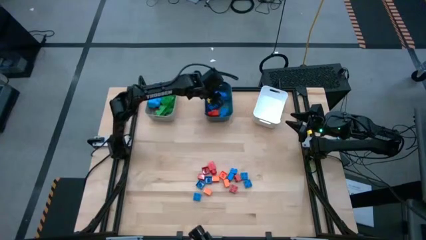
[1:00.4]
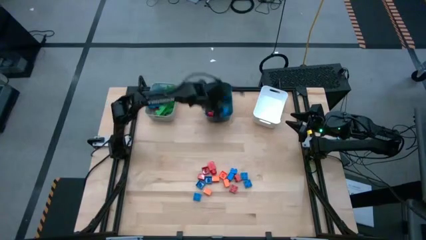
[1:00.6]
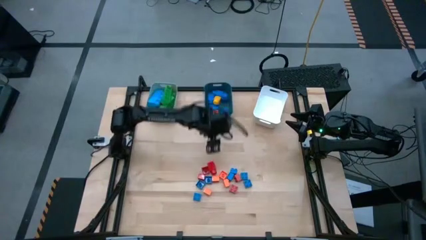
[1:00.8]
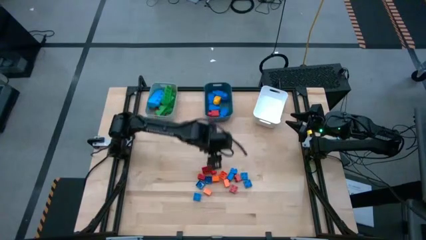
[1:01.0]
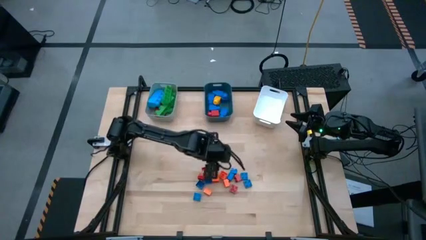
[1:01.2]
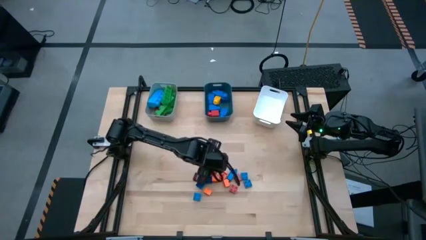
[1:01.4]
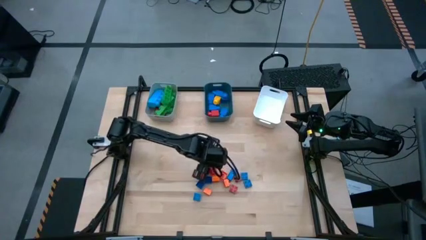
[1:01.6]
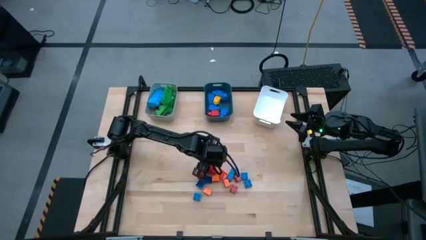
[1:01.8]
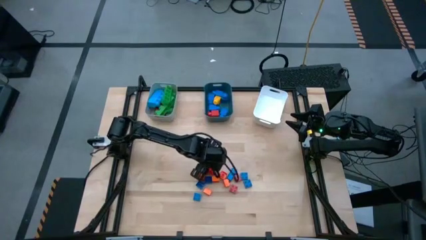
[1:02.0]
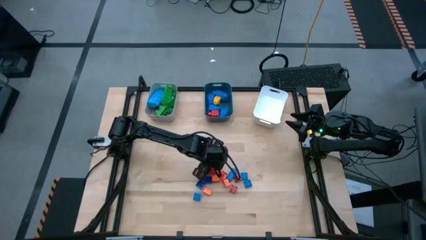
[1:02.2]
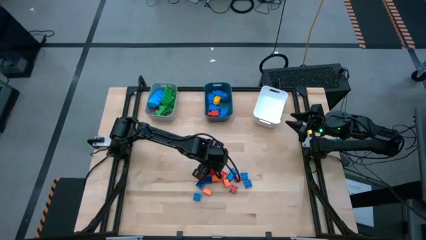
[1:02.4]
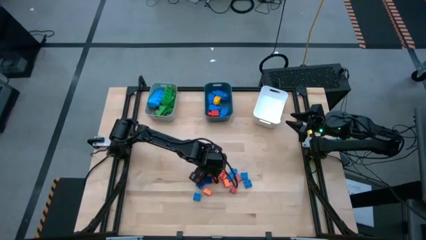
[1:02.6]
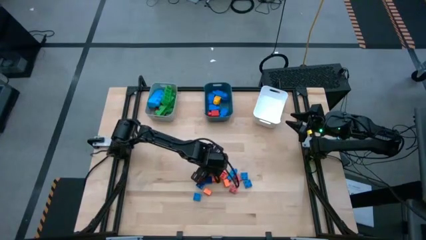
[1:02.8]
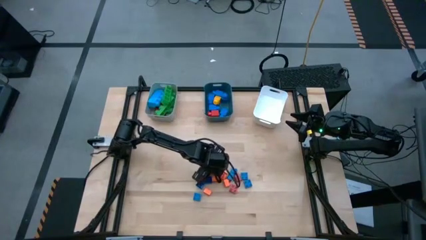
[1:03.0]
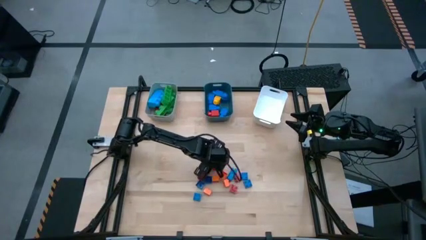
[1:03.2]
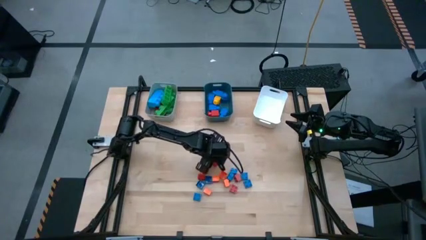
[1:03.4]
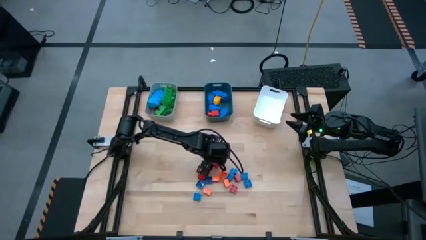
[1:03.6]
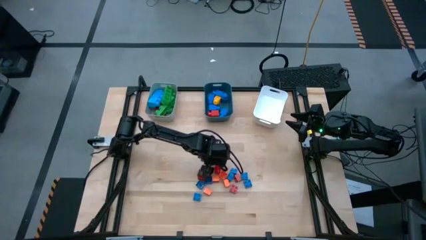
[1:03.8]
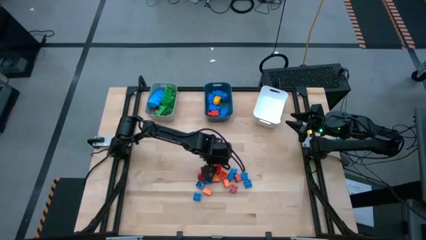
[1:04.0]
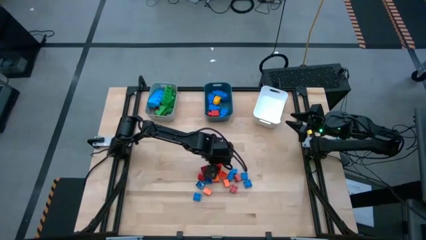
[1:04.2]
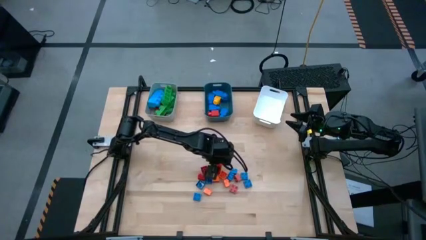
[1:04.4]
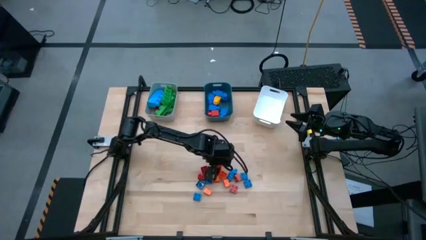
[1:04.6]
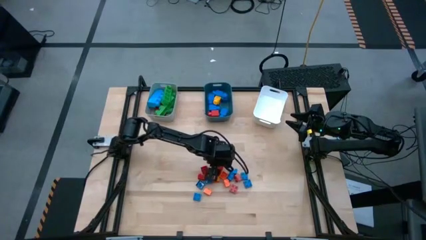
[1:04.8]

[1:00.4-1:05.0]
Task: Sort blocks by size
Put the red 1 stud game piece into the blue bin

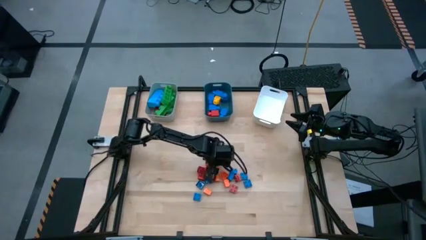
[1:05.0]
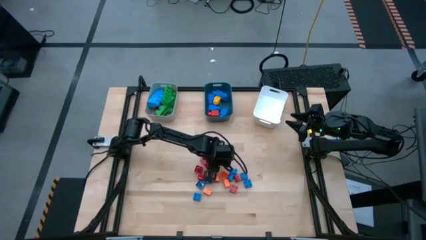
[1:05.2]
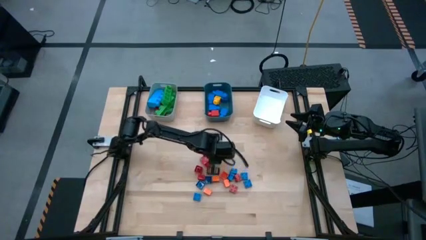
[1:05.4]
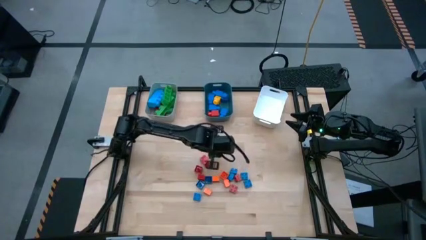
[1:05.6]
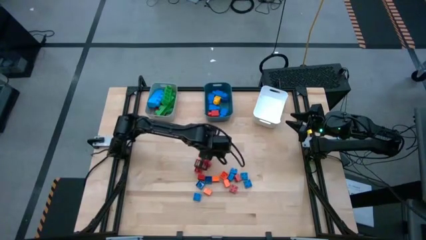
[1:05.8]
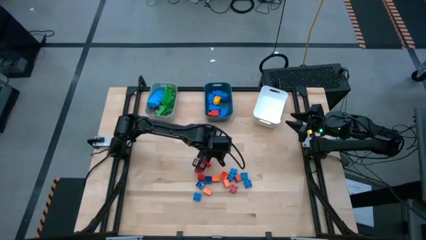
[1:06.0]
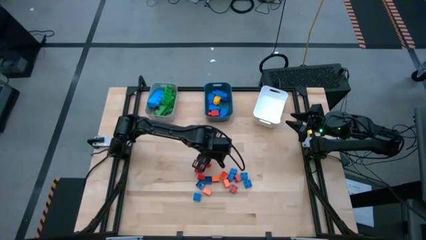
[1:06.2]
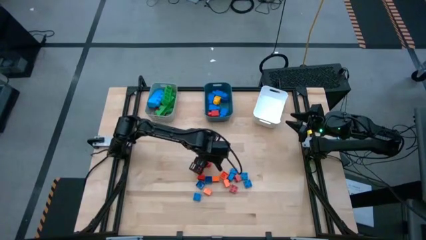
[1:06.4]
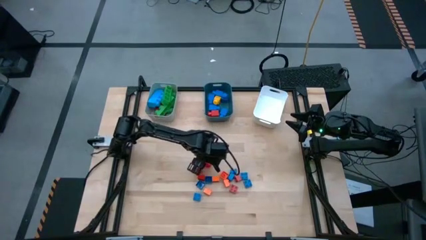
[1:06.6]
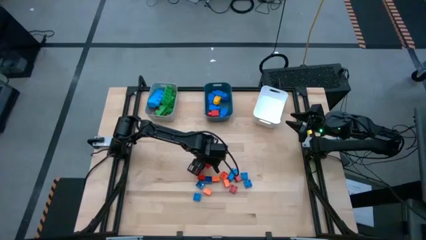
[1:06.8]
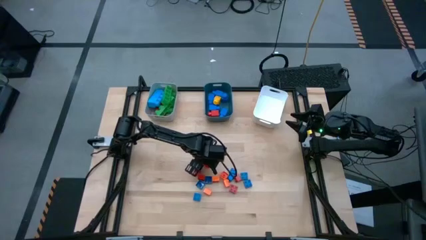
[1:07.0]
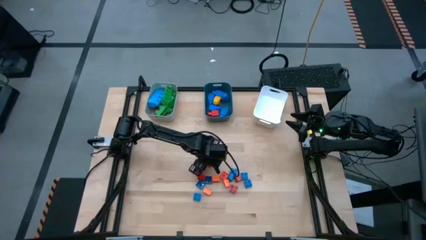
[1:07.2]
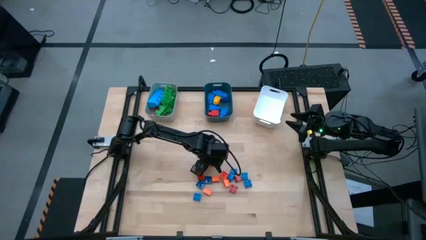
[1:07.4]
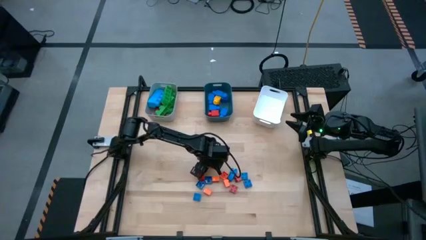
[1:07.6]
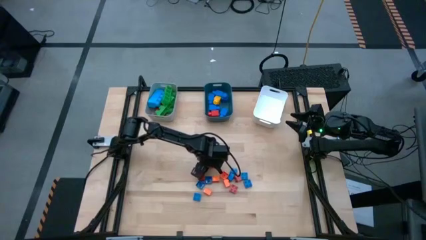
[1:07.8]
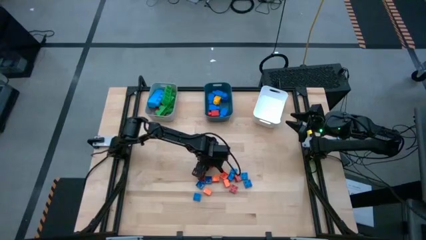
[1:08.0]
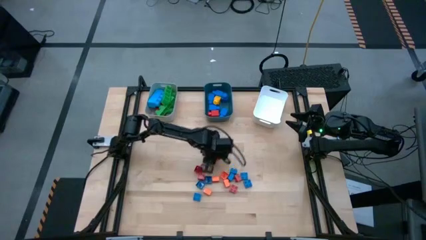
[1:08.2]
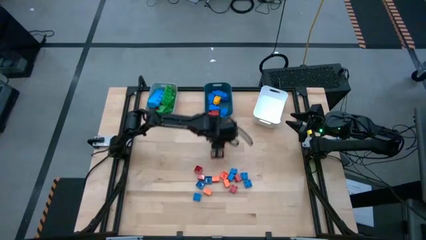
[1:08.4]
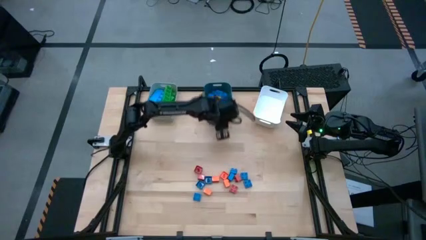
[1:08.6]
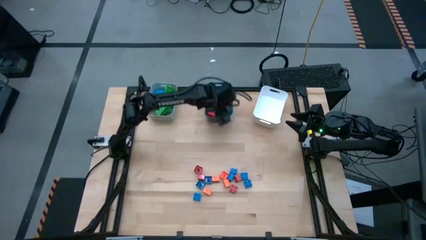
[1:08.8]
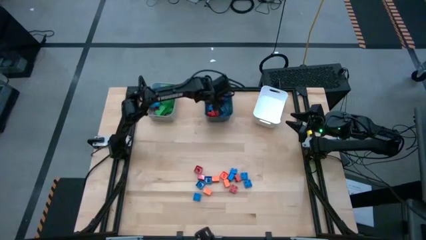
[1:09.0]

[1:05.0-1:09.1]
Put the red 1 stud game piece into the blue bin

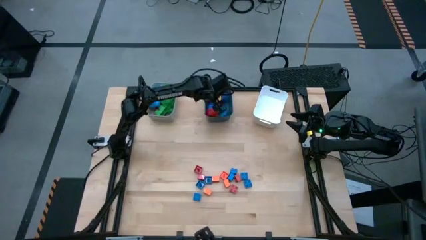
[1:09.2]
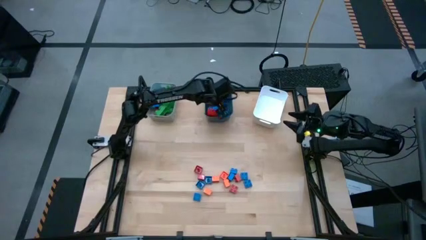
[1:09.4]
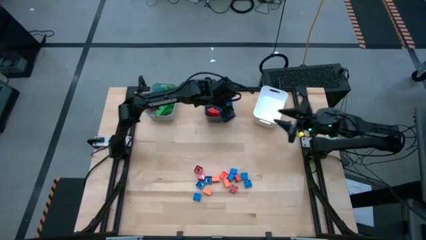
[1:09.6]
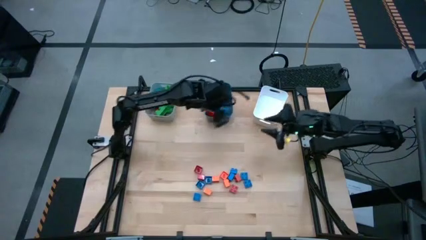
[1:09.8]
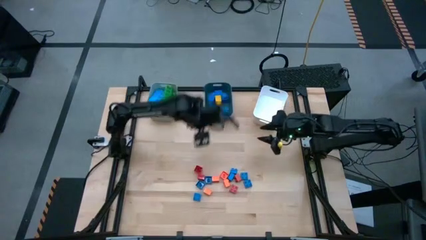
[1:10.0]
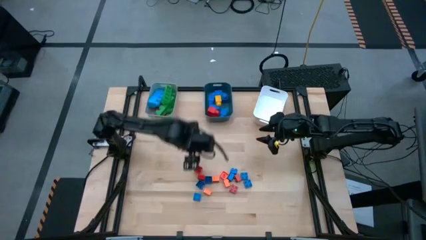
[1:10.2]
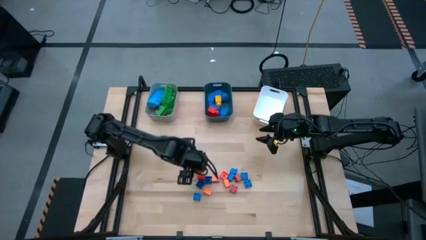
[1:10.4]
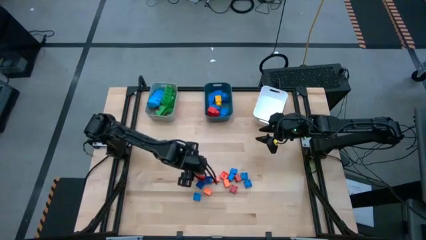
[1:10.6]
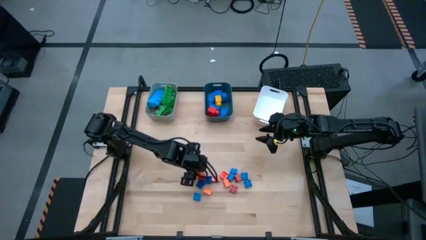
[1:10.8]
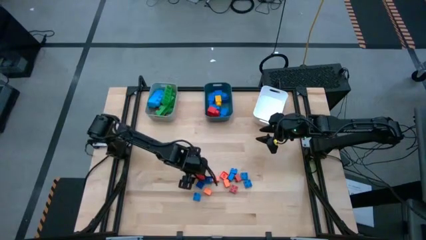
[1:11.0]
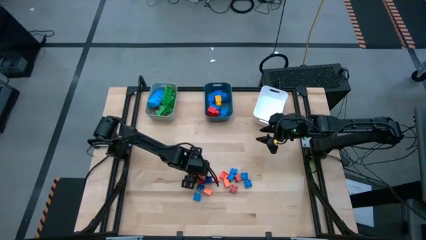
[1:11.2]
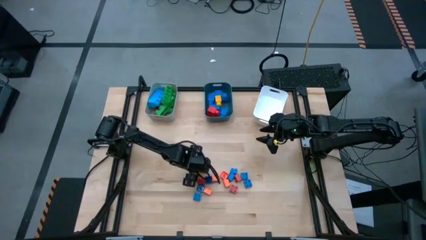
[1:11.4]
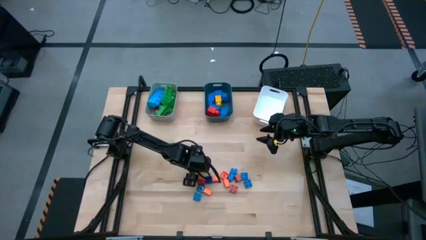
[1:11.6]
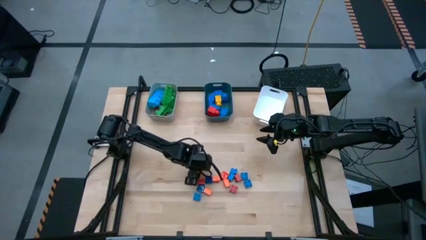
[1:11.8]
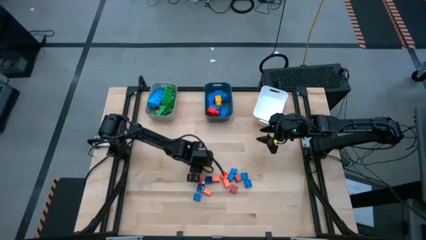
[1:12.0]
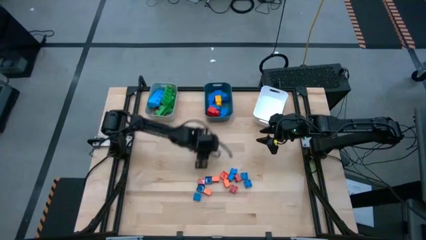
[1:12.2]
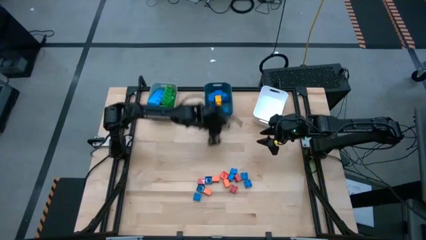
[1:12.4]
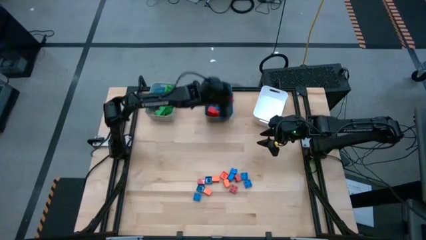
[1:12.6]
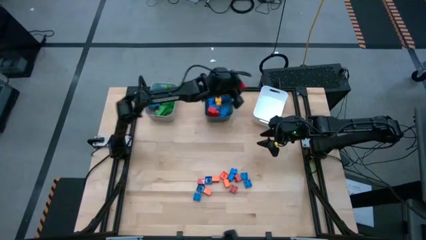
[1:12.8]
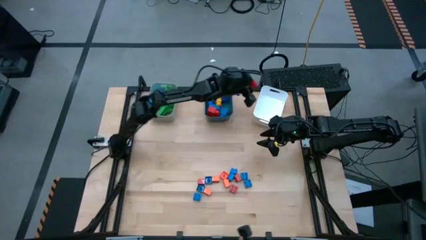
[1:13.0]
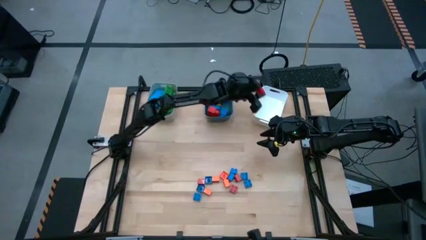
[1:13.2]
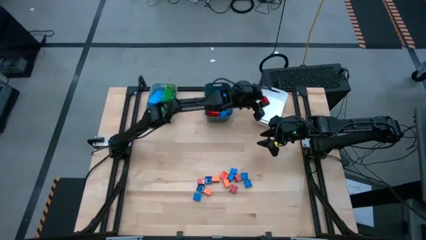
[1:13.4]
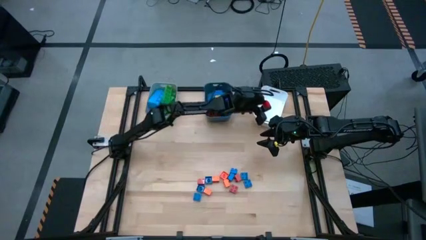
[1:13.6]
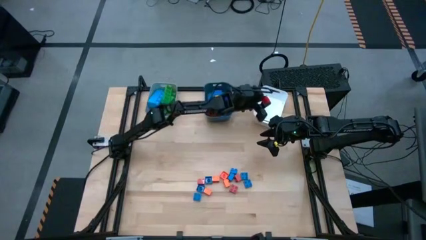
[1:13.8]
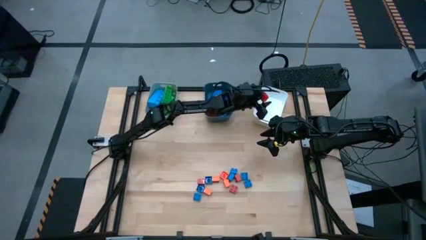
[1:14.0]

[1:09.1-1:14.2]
Put the small red 4 stud game piece into the white bin

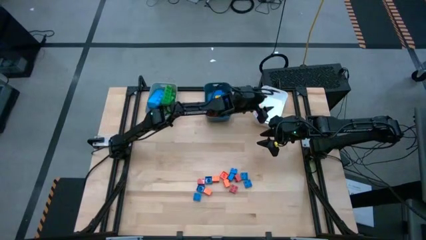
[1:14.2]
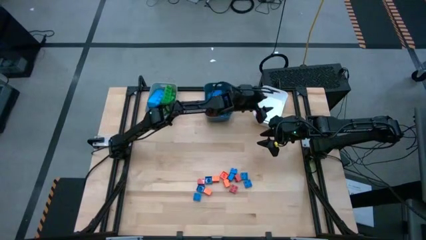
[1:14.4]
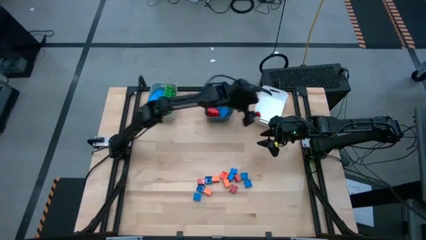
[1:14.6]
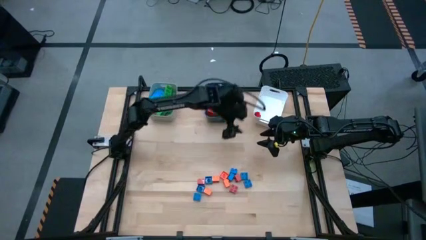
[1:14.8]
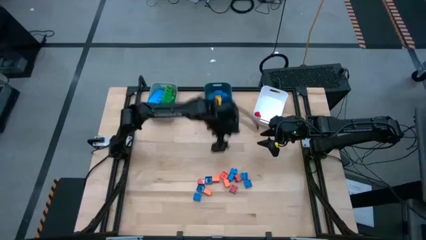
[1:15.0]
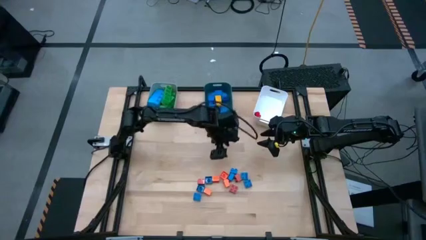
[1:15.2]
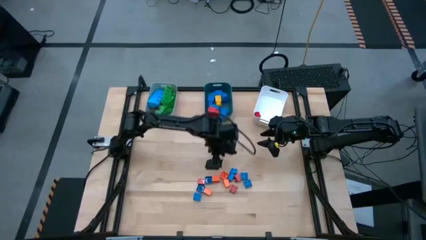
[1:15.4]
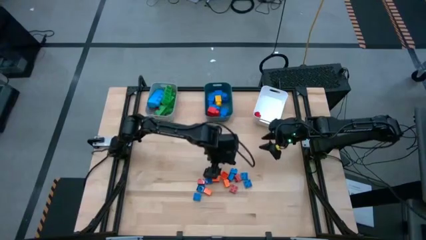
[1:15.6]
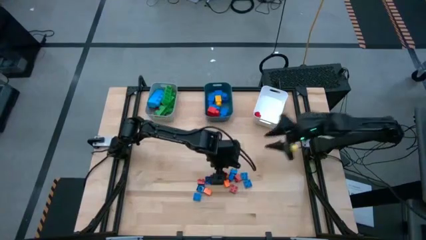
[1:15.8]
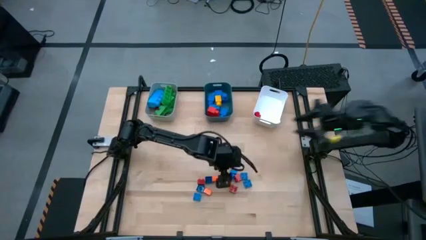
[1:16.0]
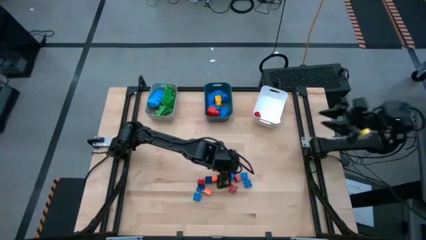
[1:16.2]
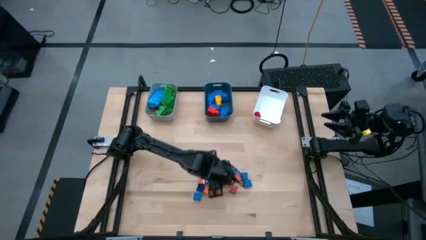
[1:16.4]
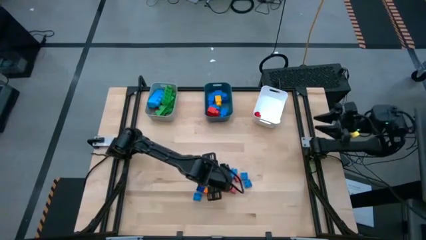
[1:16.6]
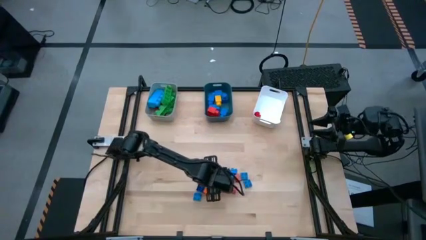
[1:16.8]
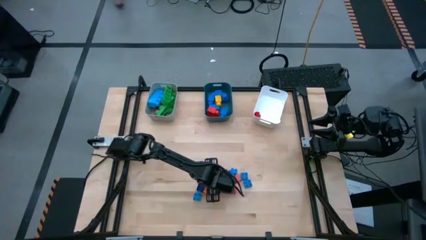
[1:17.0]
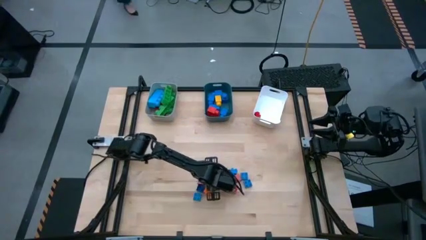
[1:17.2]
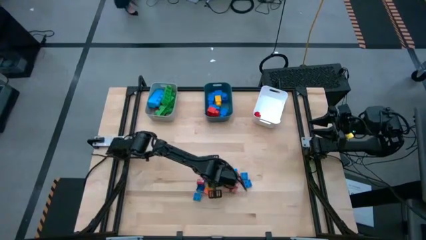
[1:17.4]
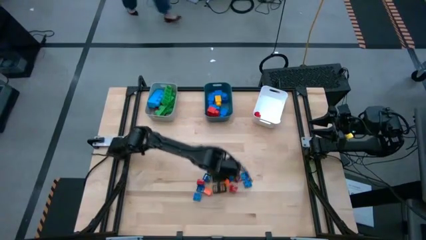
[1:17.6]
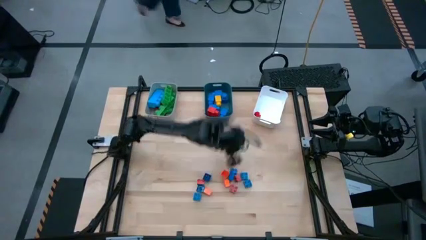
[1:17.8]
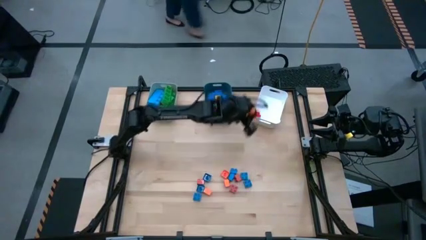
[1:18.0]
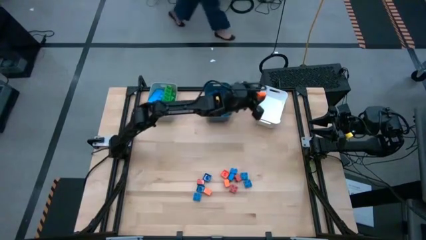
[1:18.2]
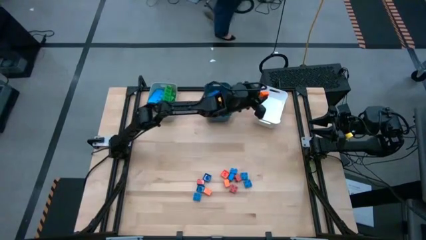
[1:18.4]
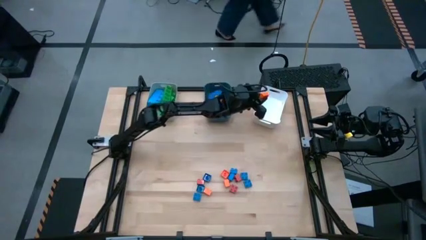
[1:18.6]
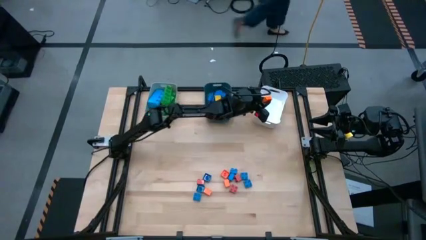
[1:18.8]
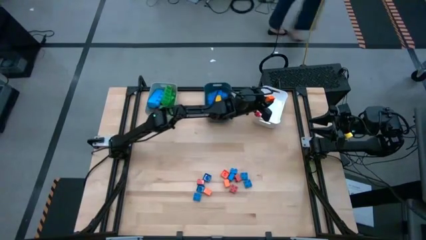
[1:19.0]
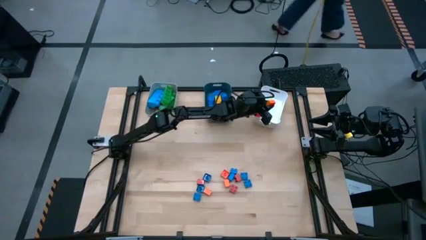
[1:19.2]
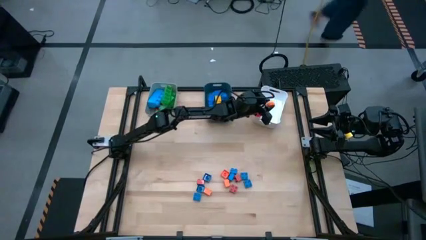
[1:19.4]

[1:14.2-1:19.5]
Put the small orange 4 stud game piece into the white bin
